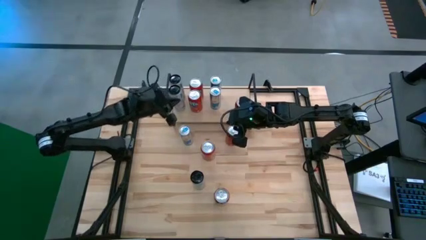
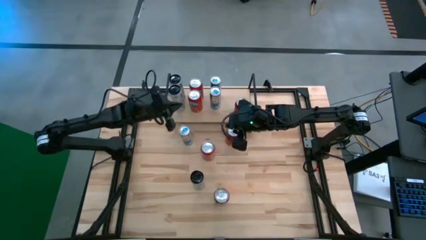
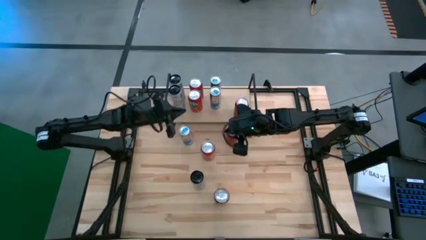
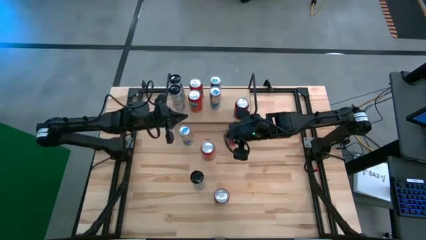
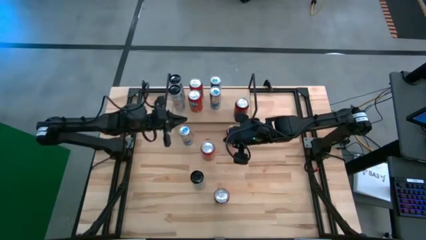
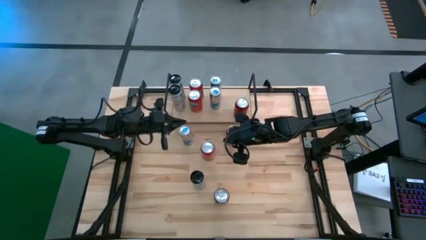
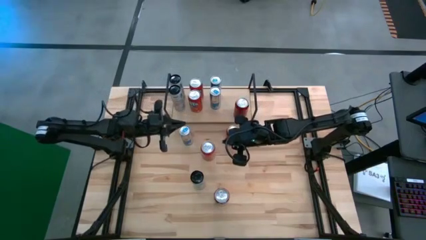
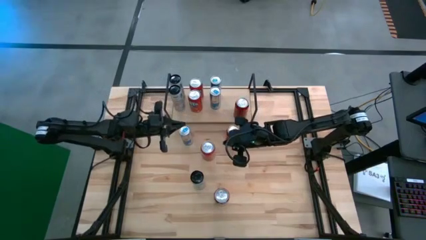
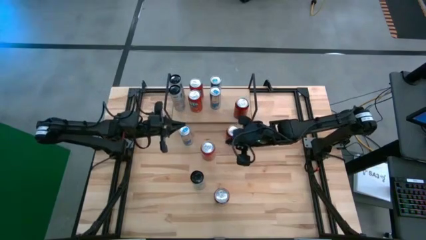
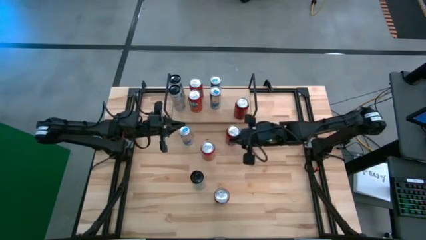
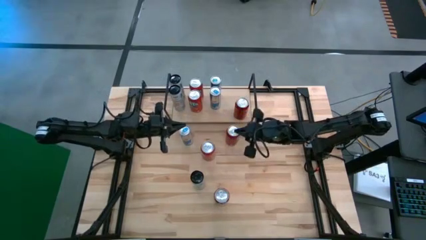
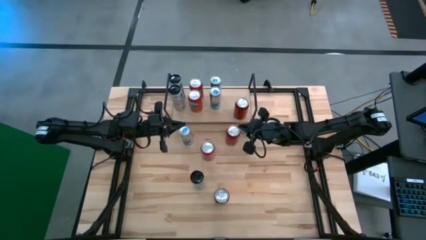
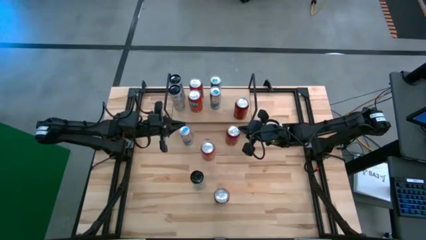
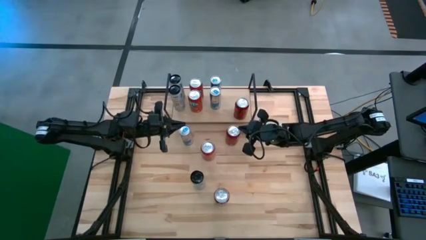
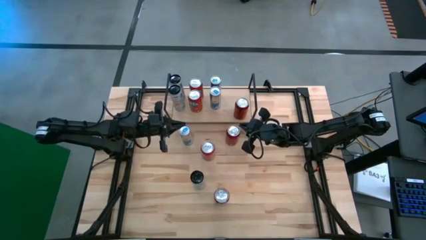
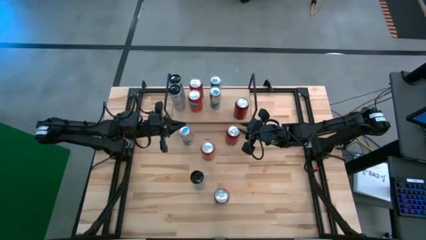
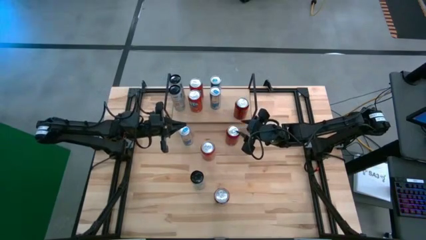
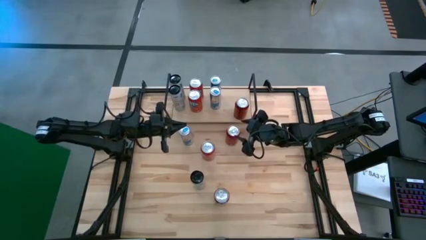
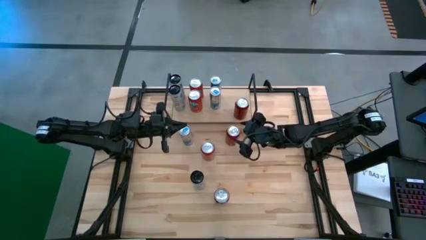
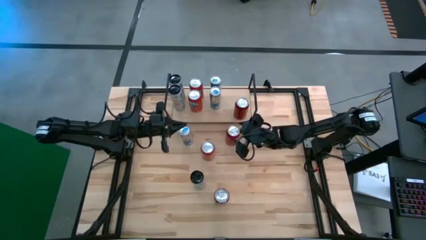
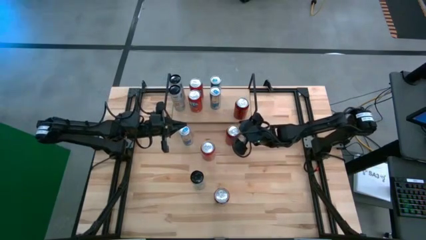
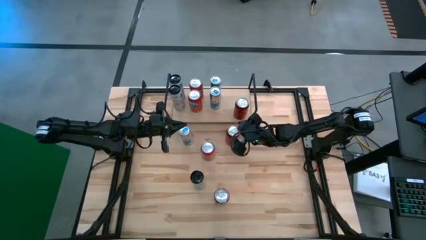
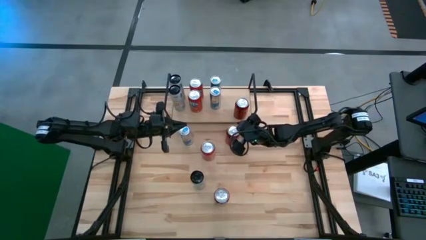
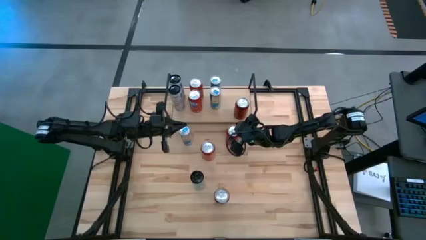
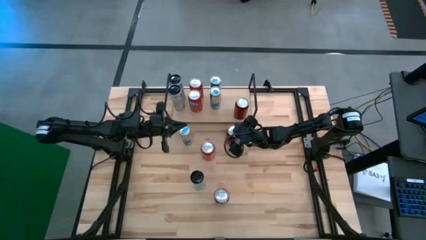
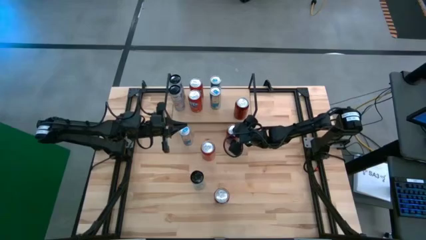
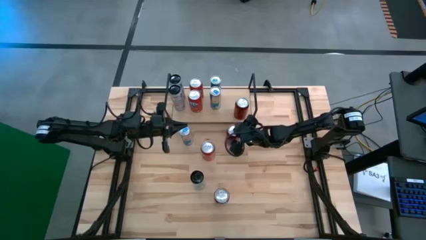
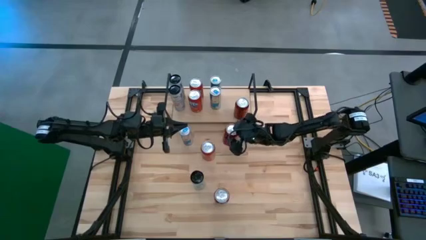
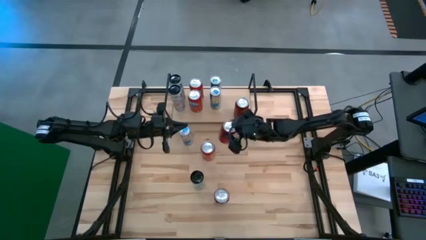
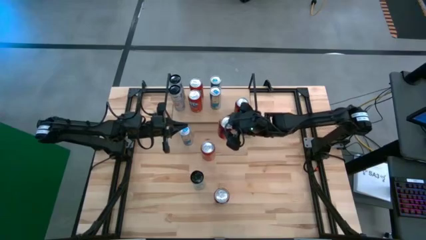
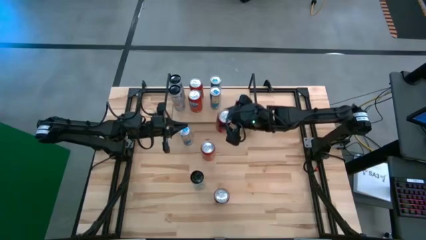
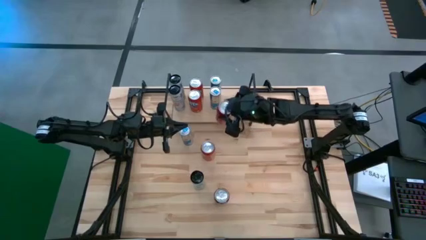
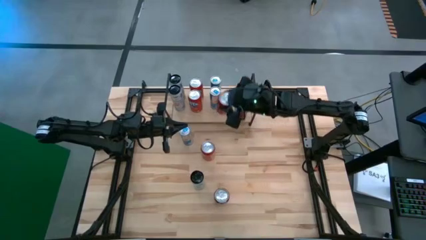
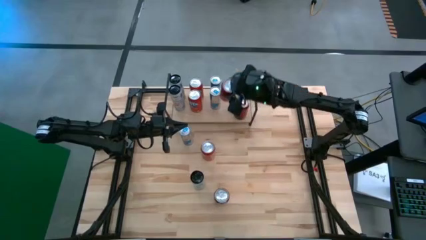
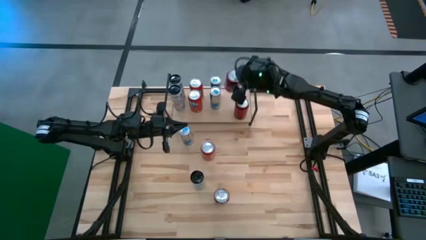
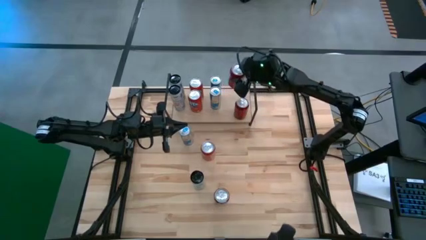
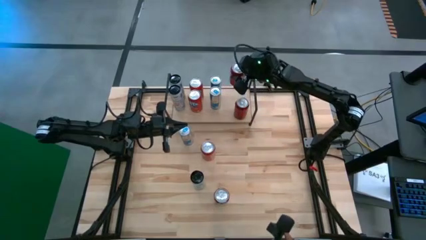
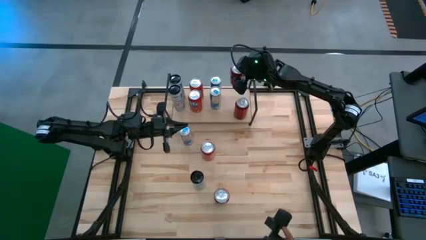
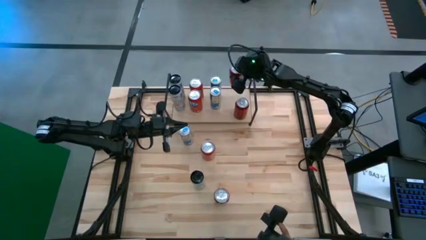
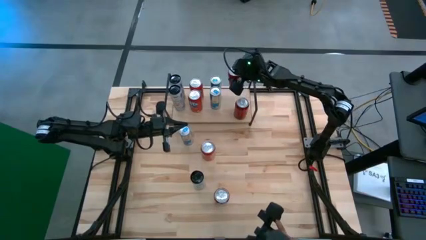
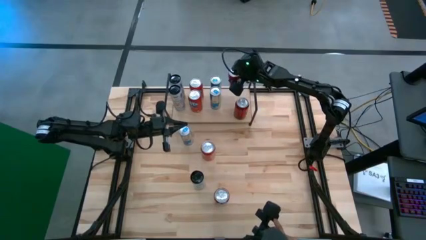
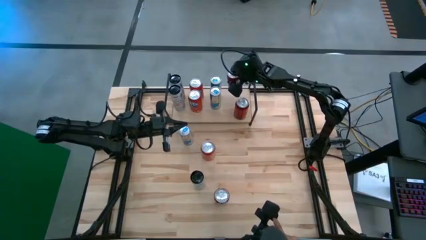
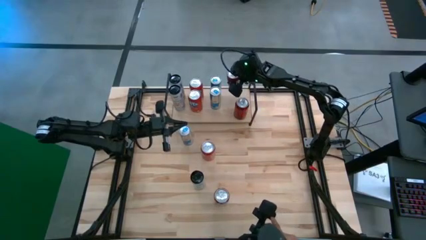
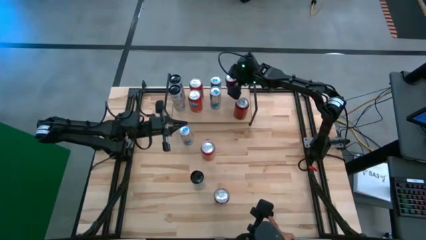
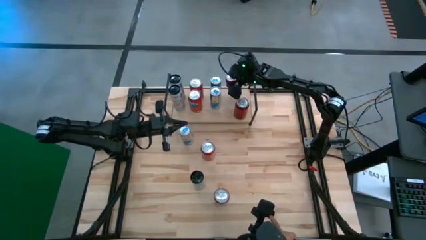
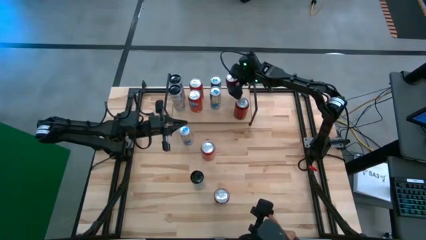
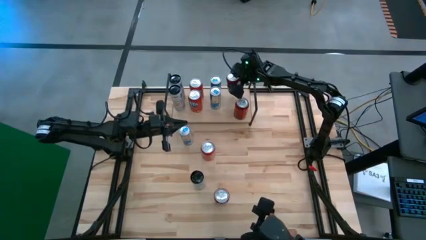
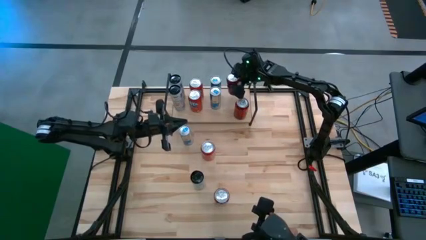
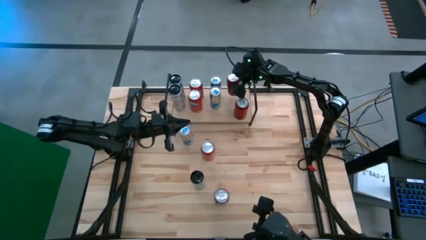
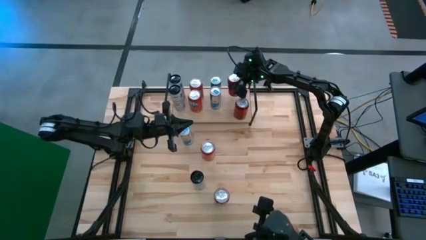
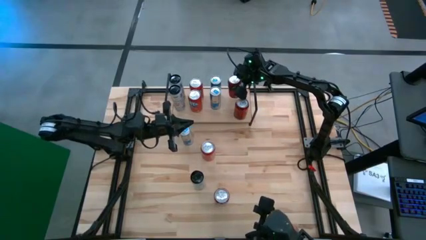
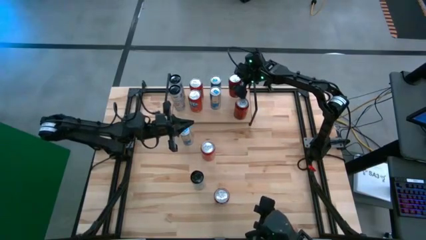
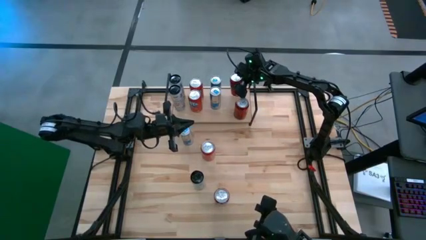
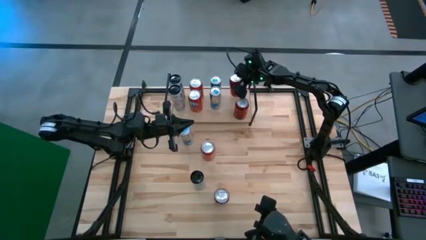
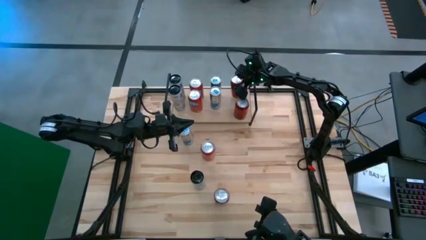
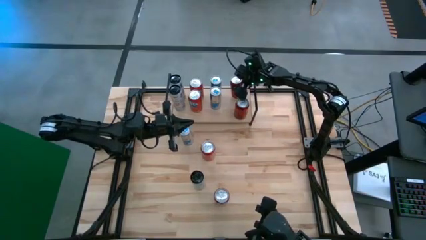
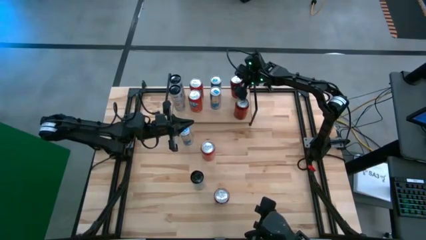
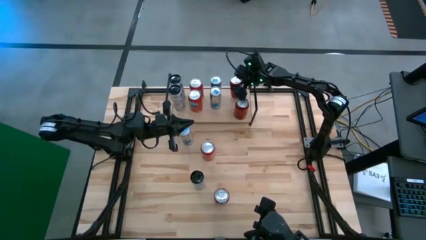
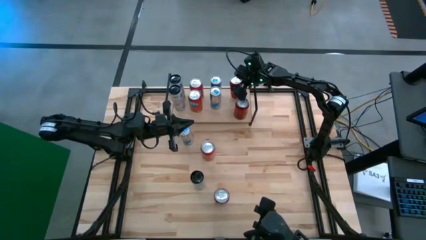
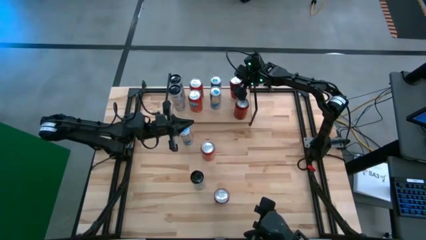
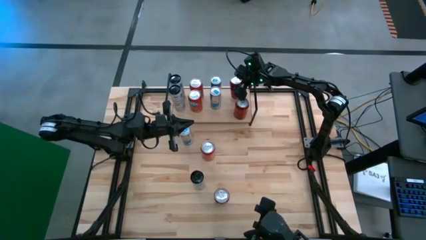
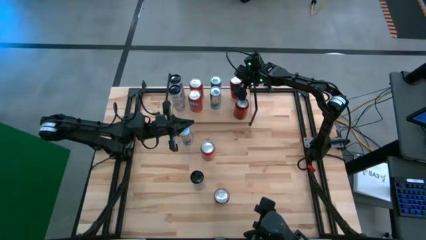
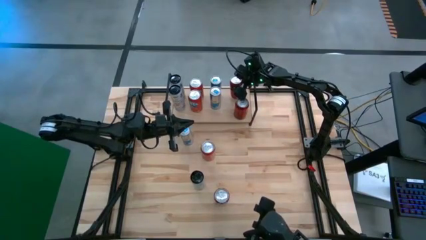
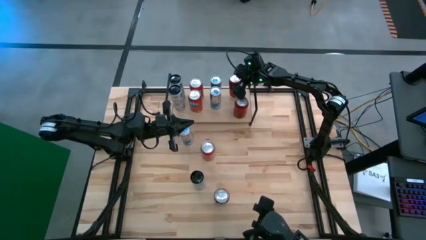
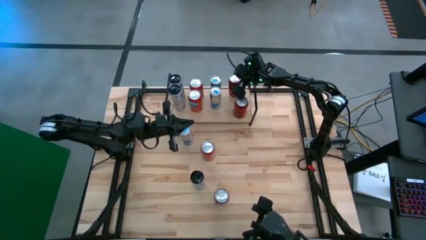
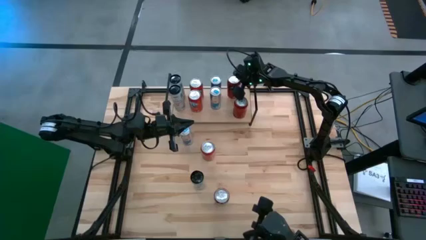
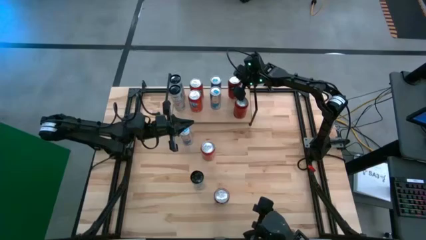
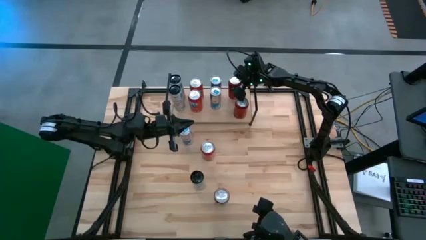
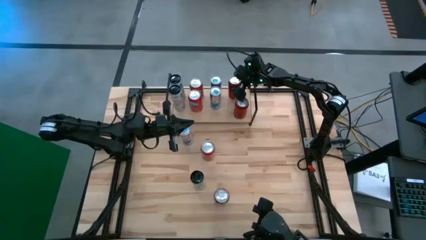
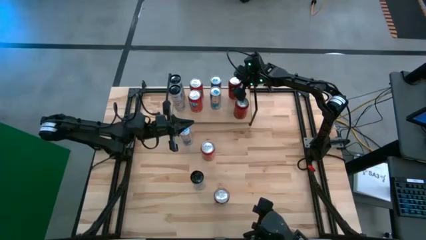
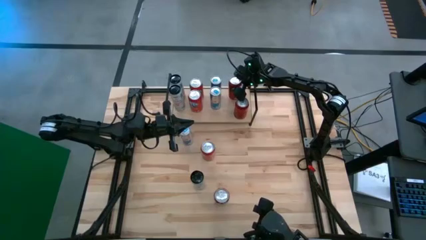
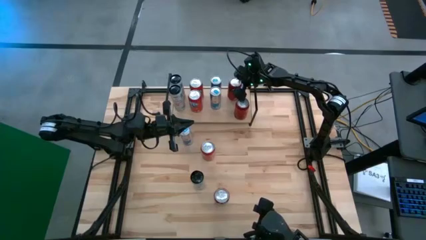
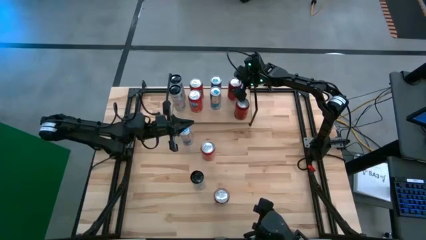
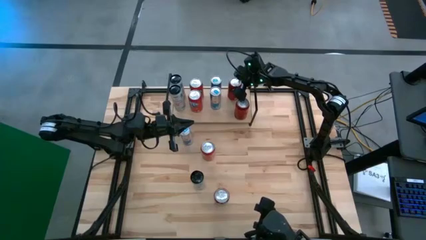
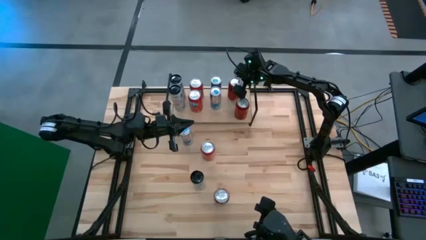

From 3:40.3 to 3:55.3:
Task: Place canned beverage on shelf
Put the top red soda can on the shelf aligned with the other red soda can
